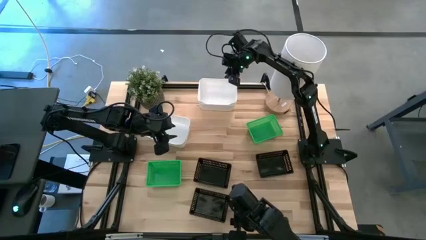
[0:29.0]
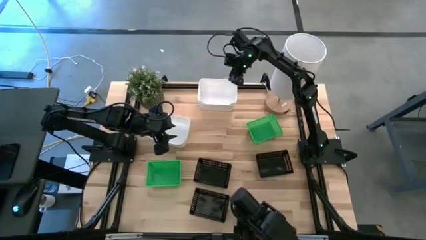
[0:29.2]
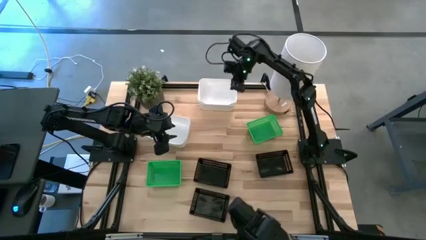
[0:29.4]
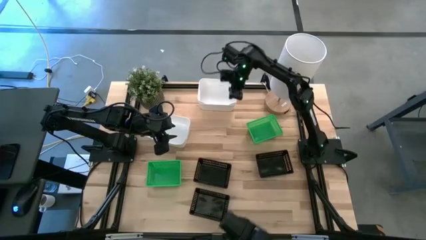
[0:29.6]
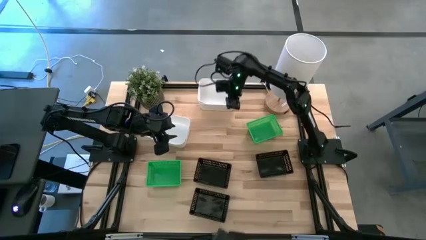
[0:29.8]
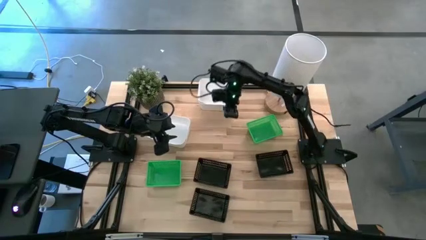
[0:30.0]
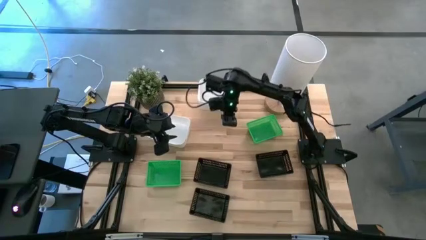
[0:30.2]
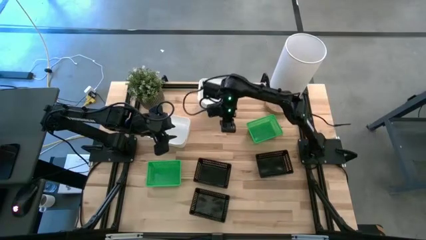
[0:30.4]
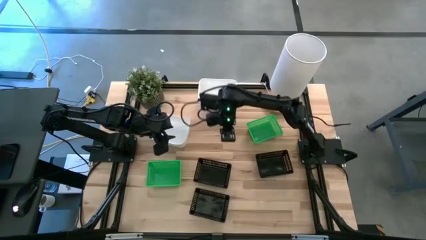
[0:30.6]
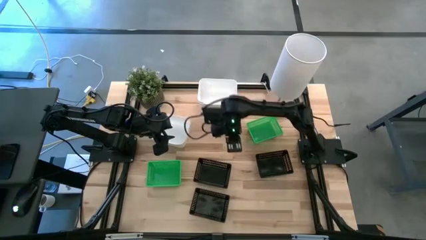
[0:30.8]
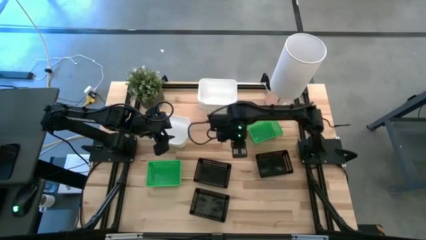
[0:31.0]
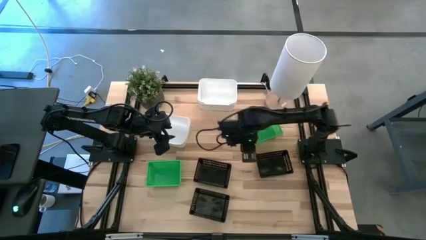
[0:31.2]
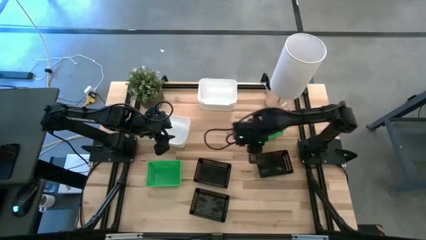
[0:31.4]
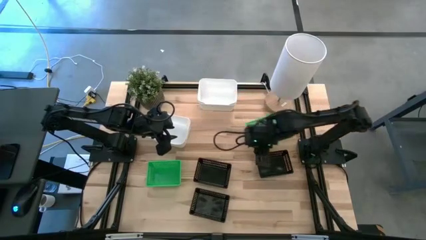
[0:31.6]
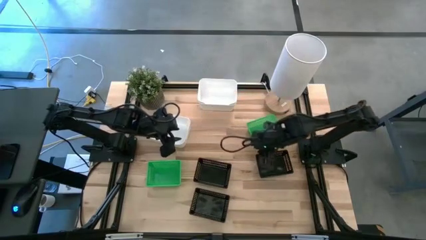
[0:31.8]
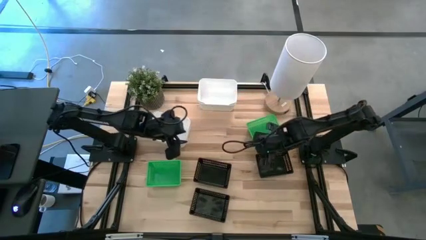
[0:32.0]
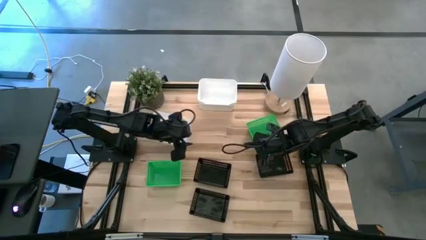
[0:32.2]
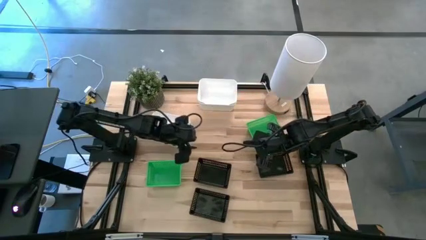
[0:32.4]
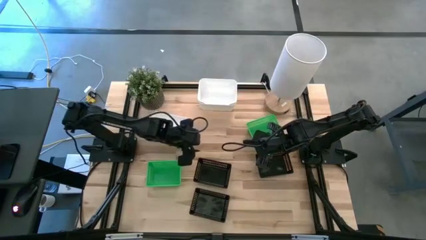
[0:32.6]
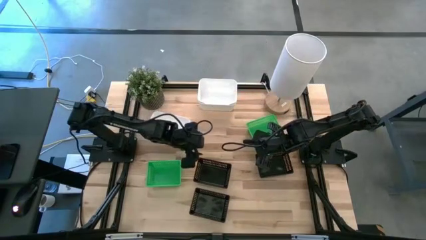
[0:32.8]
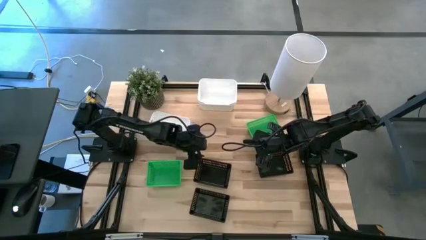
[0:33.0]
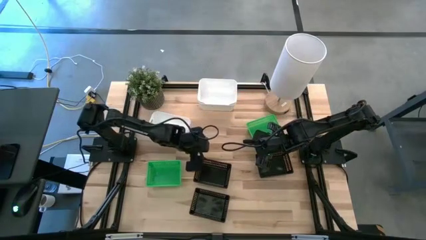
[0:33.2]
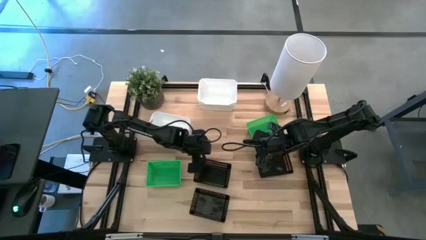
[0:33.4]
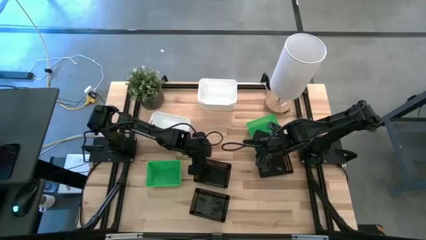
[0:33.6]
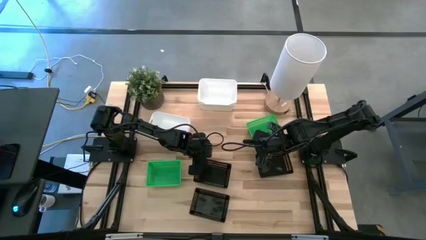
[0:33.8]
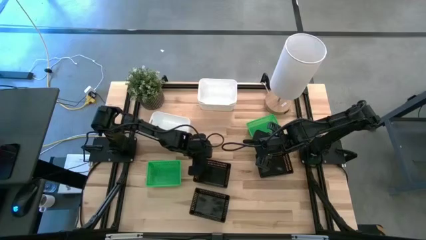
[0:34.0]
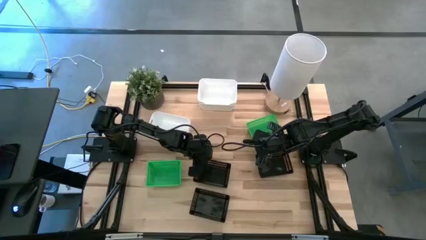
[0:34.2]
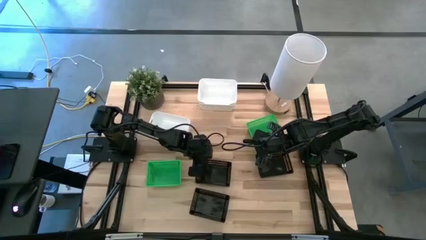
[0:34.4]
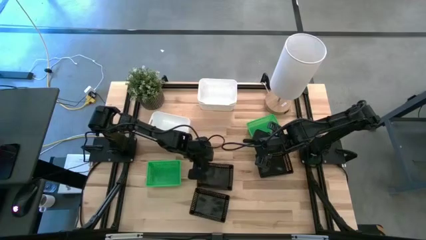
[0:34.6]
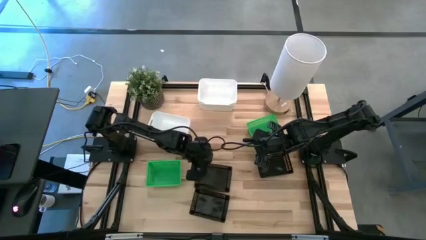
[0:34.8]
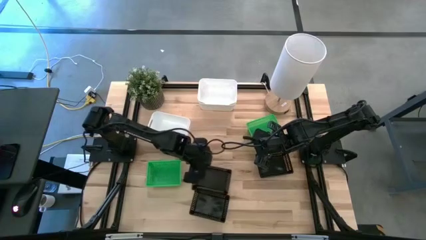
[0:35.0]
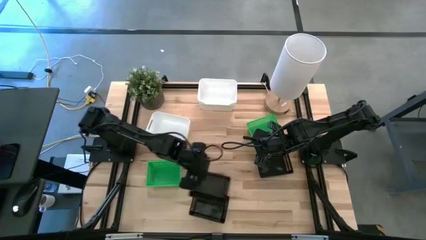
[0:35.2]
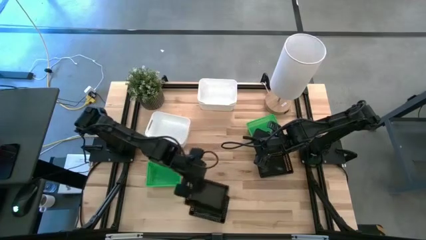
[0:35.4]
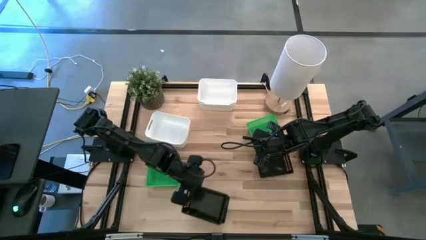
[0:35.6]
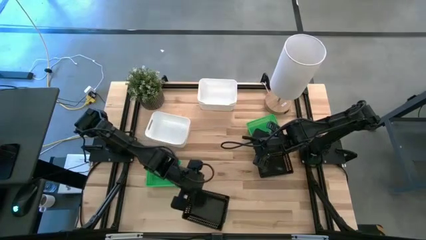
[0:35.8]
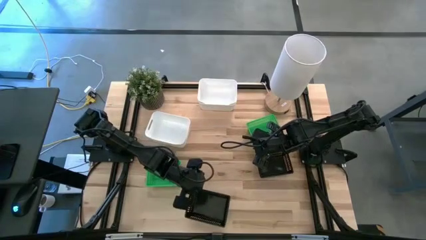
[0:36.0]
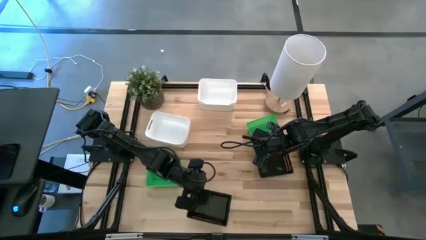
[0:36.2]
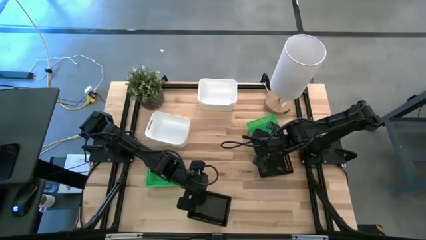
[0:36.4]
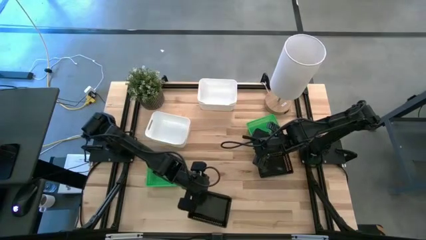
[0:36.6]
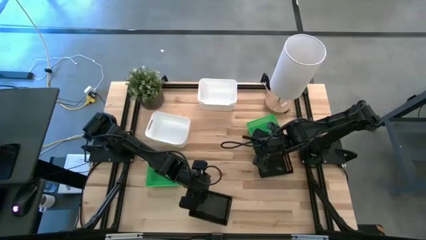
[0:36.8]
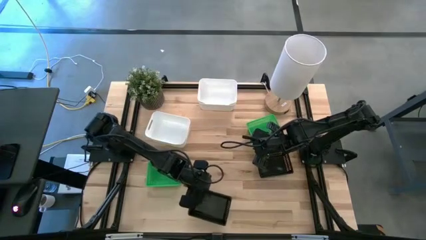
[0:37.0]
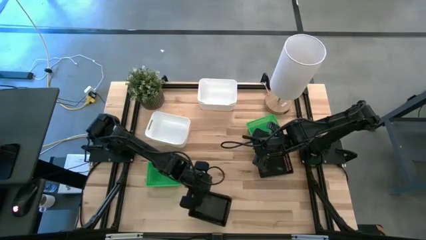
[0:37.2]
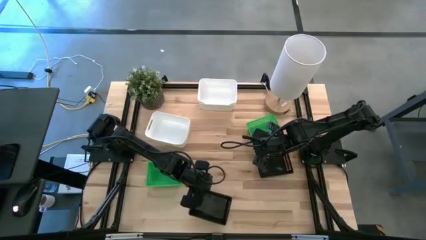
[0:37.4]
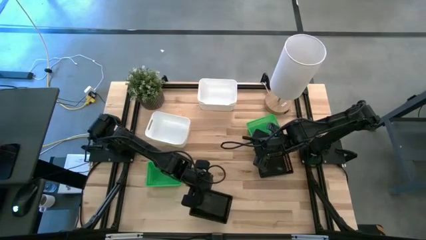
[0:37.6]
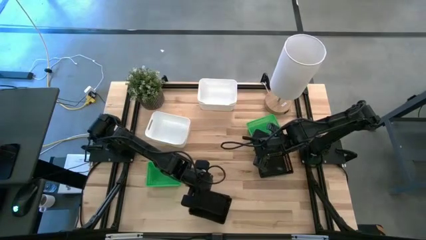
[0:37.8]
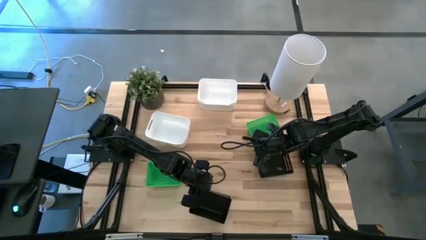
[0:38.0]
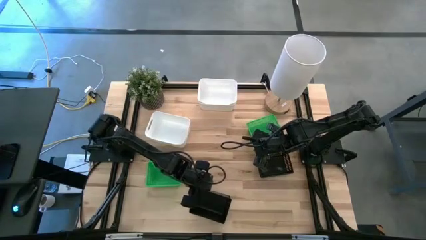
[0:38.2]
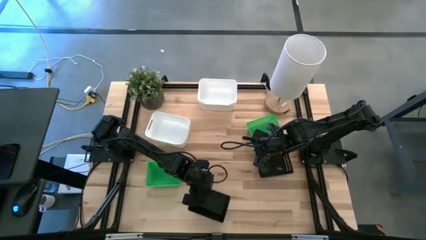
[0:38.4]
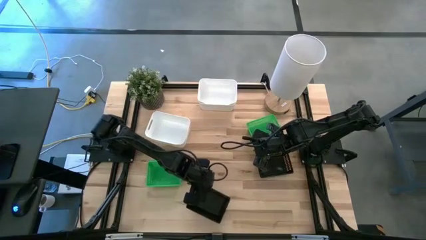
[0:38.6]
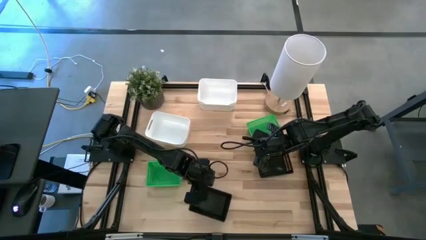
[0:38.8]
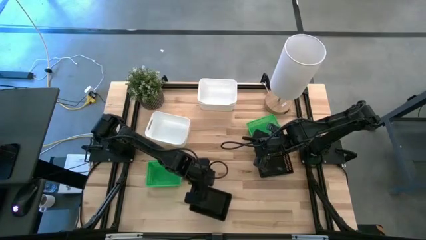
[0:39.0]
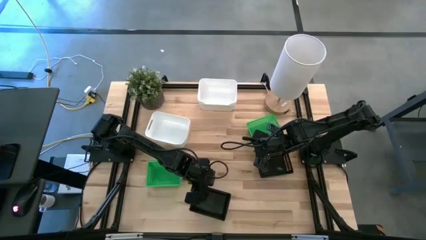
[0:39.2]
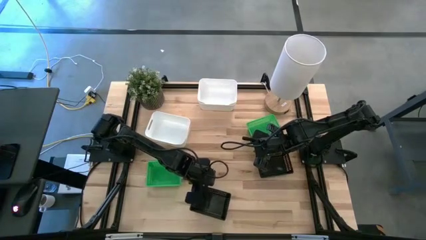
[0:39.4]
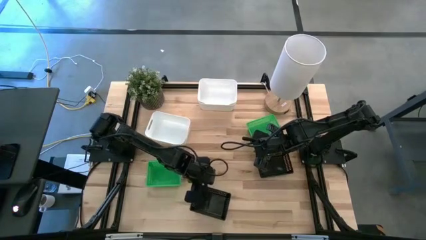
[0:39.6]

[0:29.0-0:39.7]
Stack the top left black bin on the bottom black bin

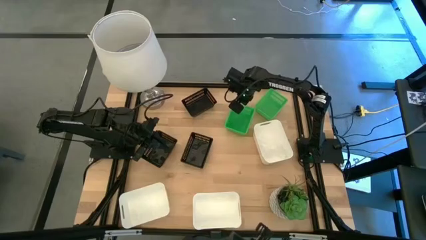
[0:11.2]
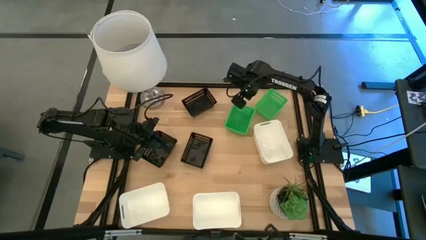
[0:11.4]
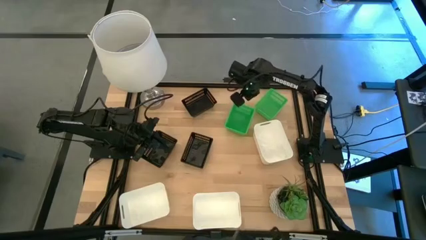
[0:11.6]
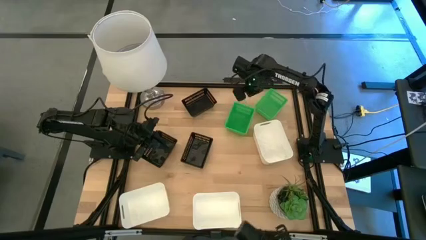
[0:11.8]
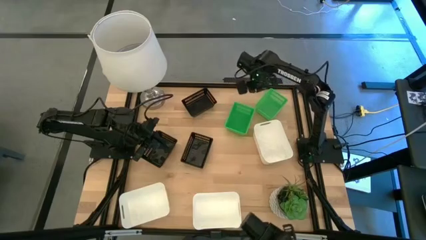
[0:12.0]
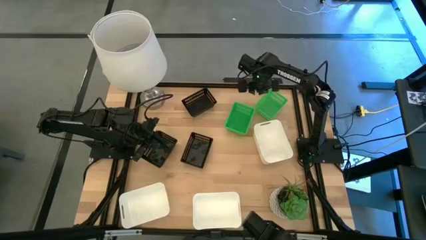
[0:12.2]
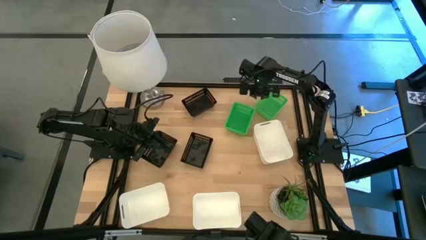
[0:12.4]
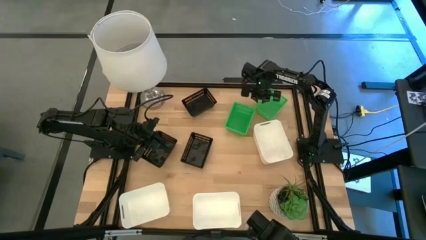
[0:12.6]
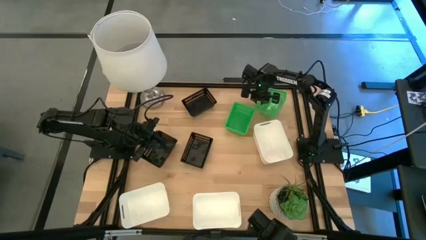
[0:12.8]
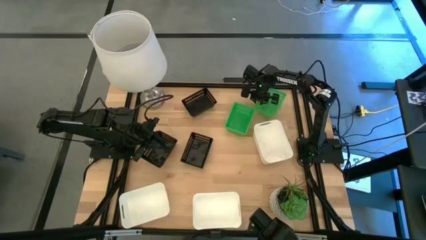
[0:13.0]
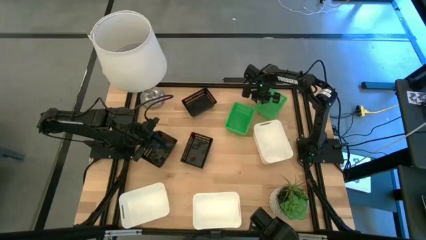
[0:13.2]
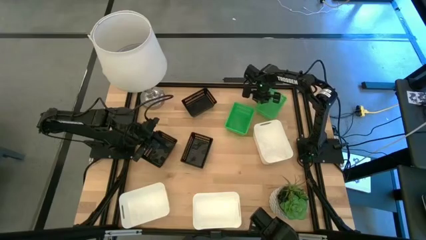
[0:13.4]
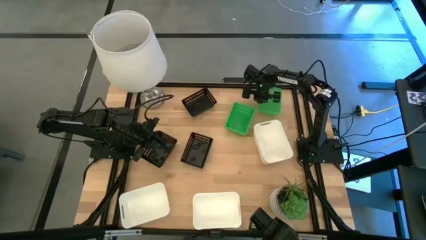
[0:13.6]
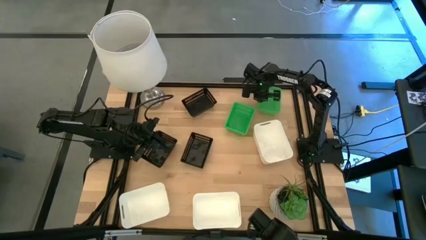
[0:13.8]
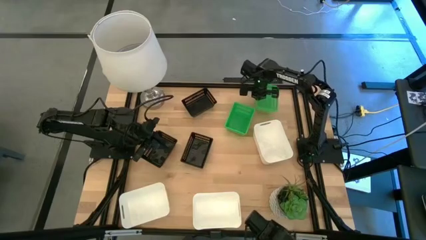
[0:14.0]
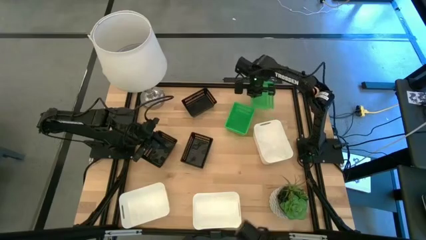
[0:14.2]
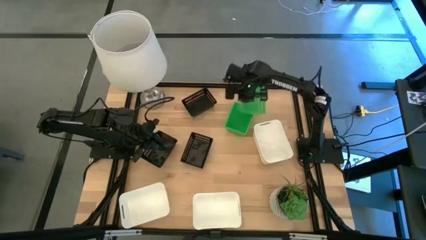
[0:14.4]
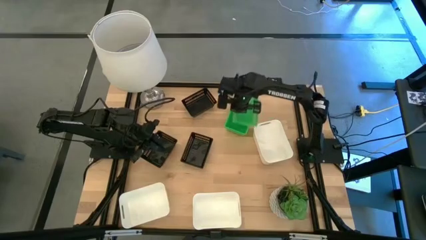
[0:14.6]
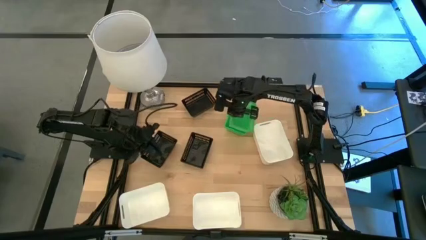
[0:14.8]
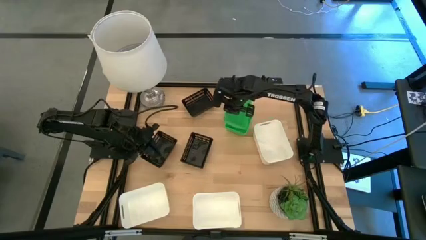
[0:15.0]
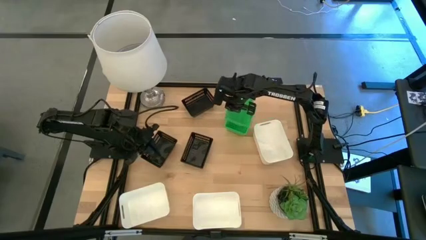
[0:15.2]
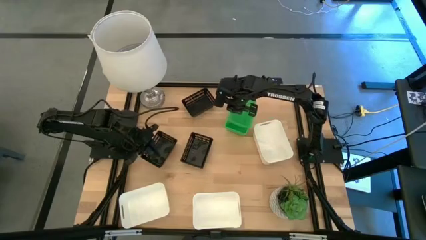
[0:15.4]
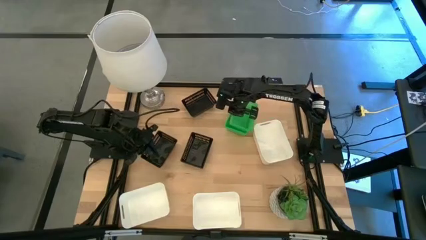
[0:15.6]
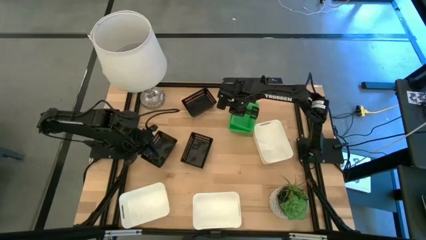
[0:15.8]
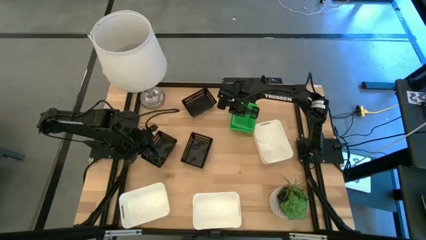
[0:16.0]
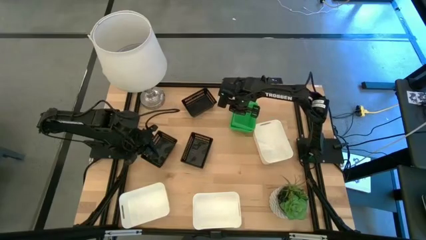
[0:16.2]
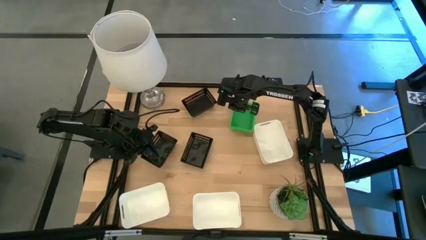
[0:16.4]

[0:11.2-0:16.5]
Stack the right green bin on top of the left green bin
